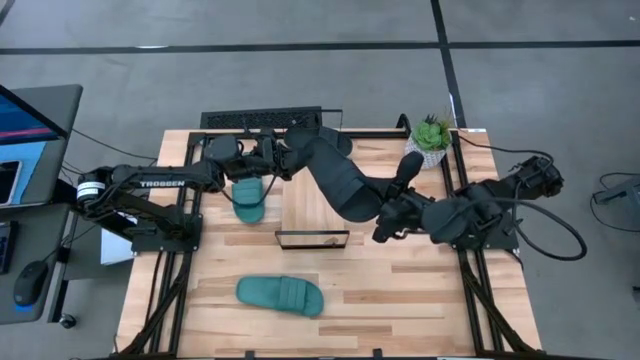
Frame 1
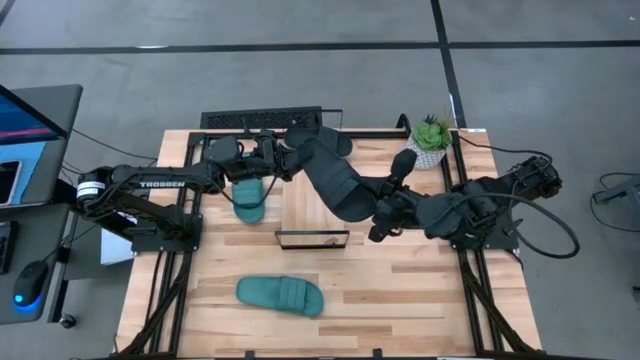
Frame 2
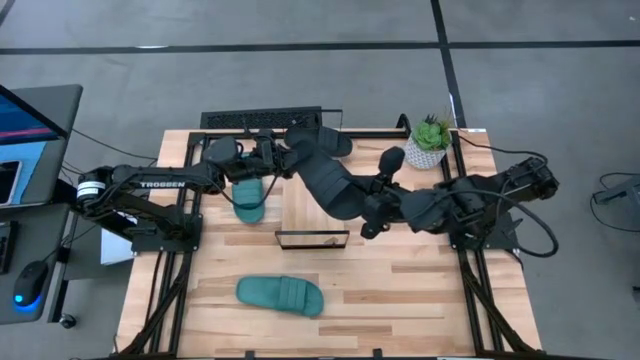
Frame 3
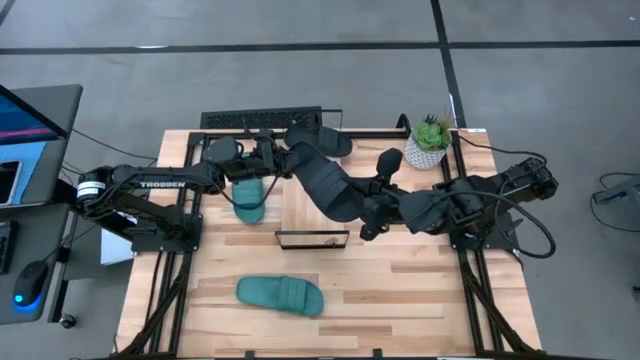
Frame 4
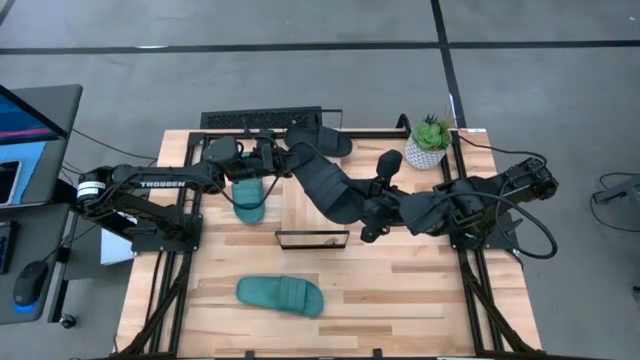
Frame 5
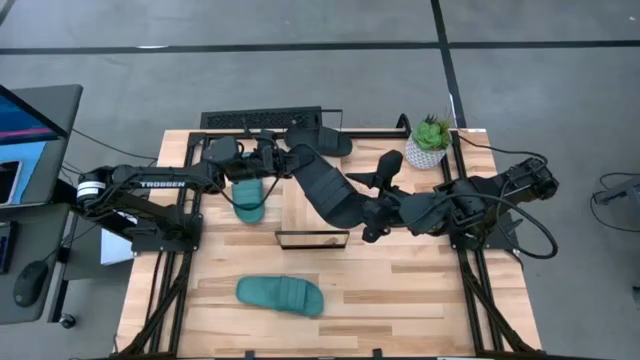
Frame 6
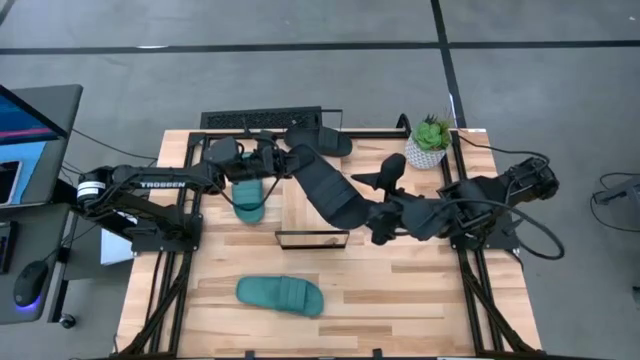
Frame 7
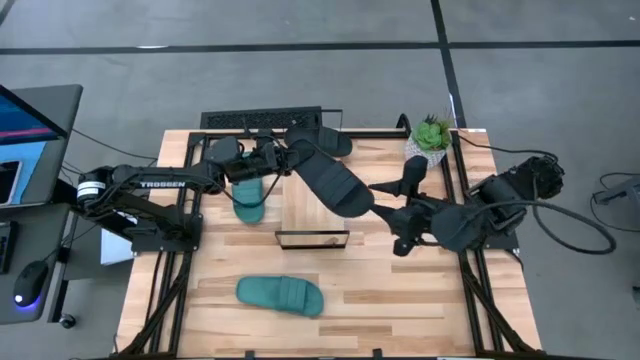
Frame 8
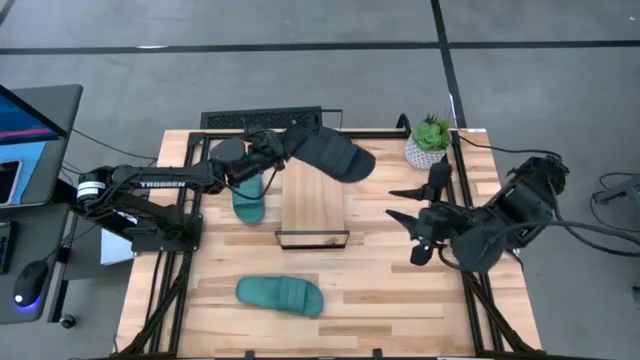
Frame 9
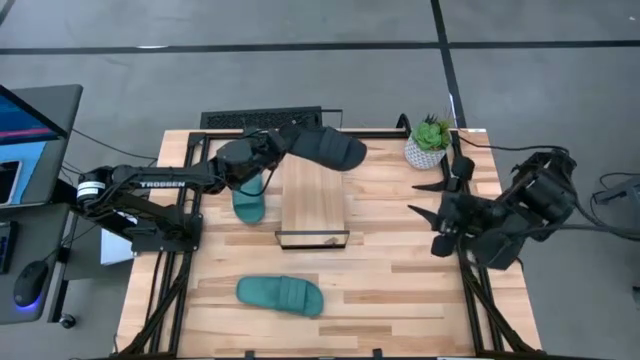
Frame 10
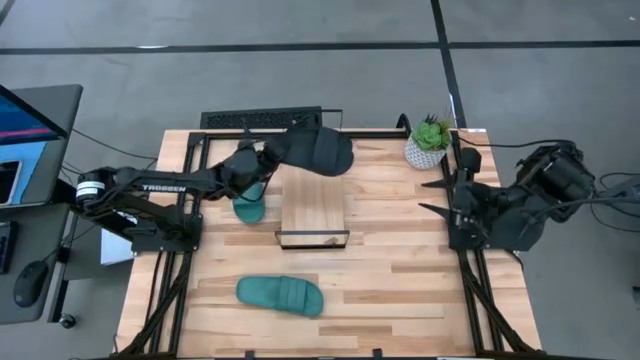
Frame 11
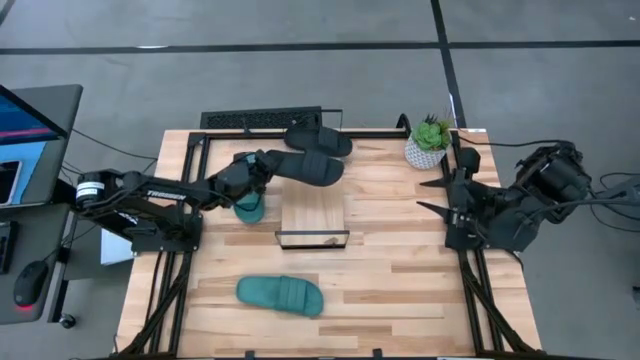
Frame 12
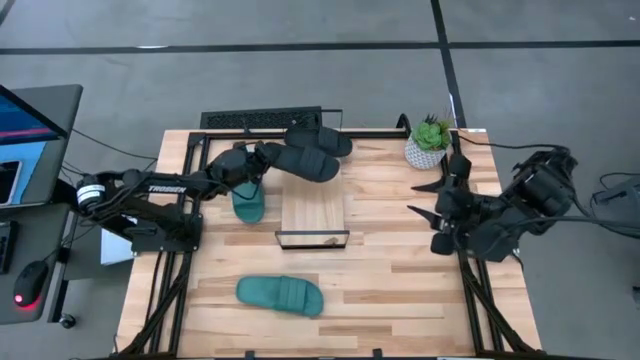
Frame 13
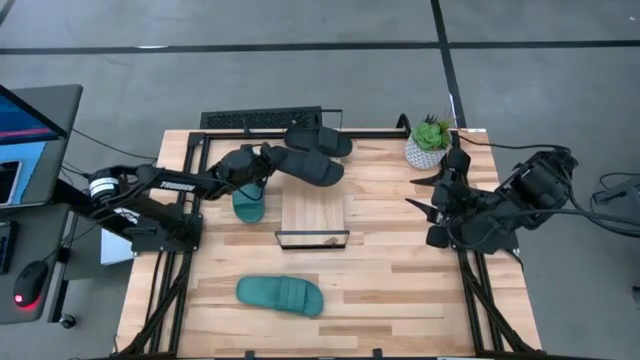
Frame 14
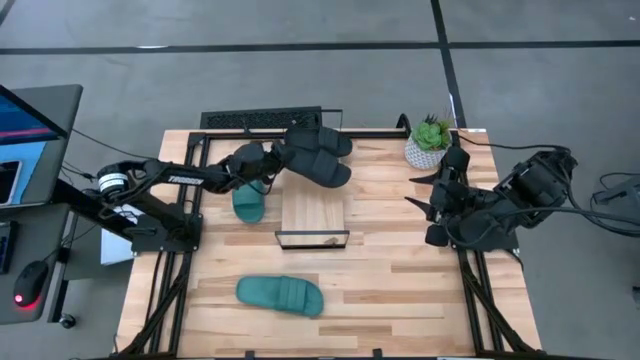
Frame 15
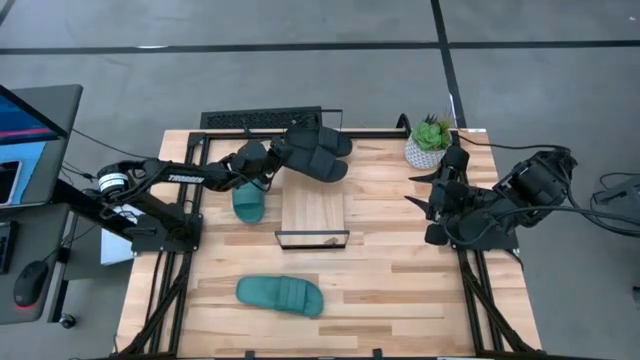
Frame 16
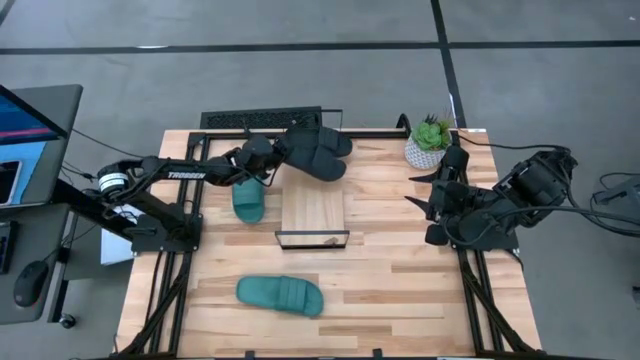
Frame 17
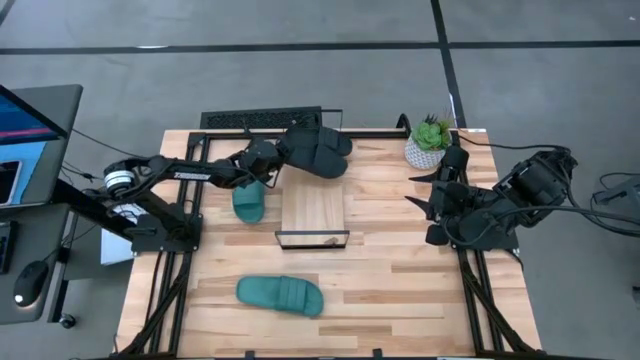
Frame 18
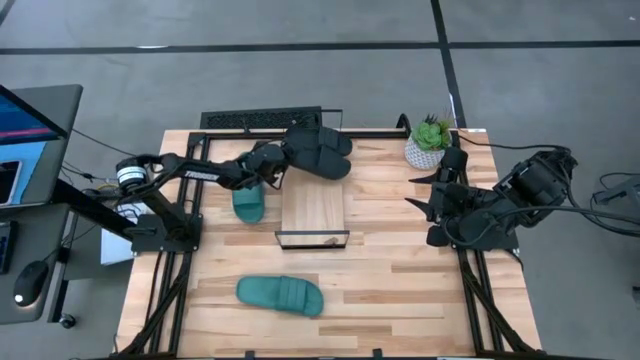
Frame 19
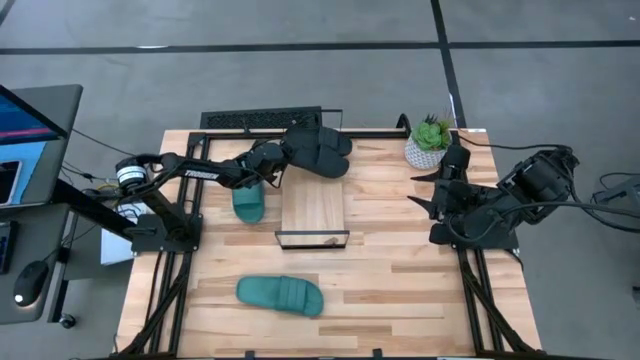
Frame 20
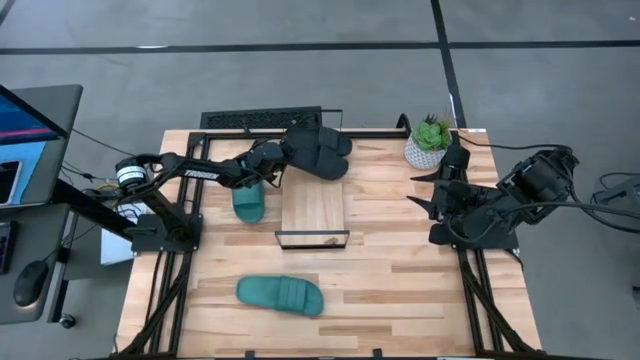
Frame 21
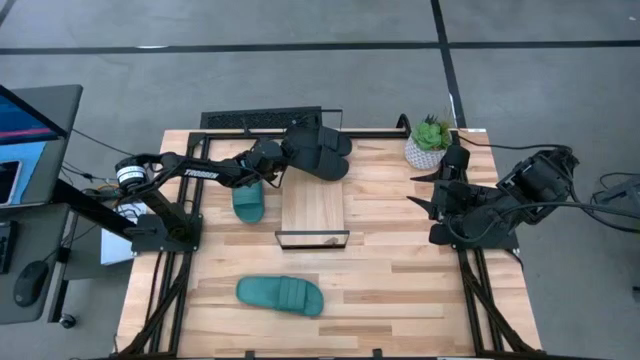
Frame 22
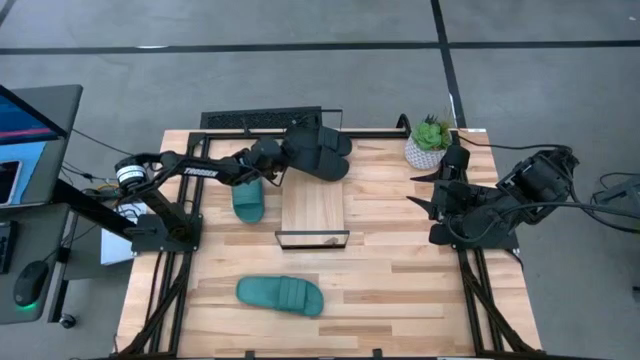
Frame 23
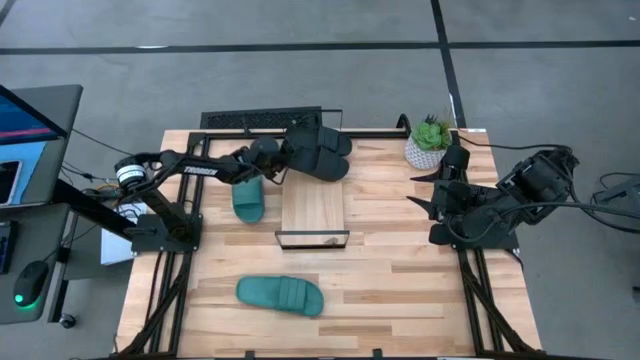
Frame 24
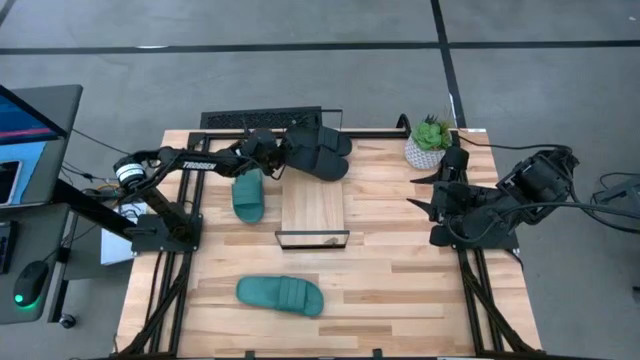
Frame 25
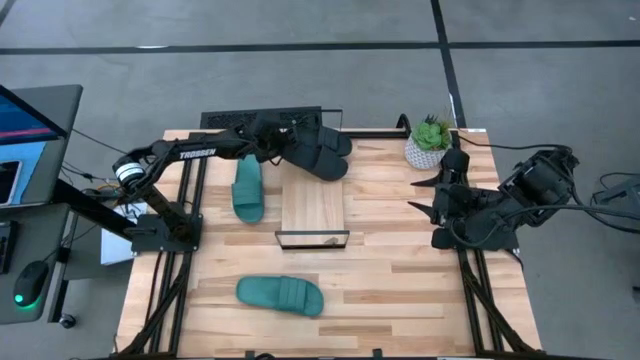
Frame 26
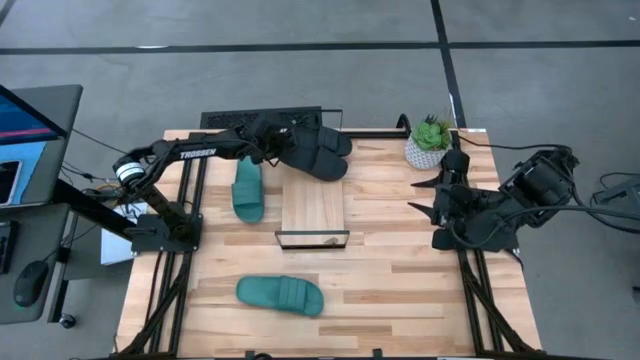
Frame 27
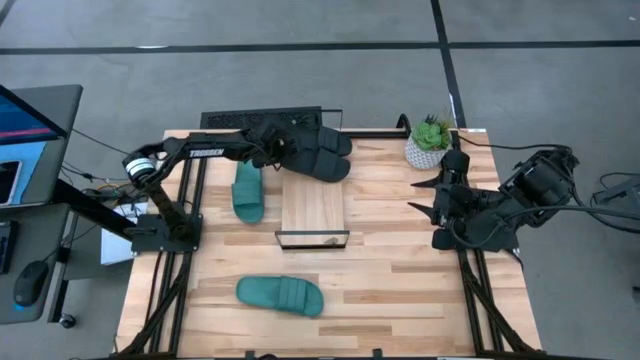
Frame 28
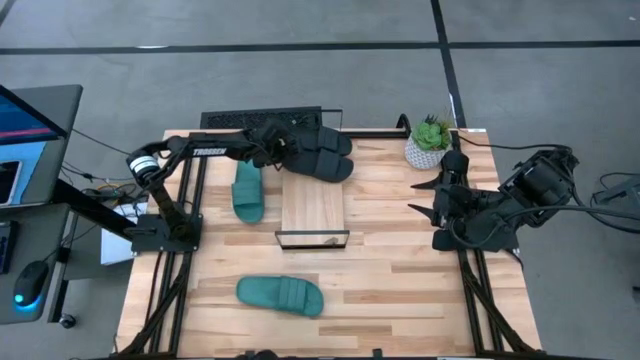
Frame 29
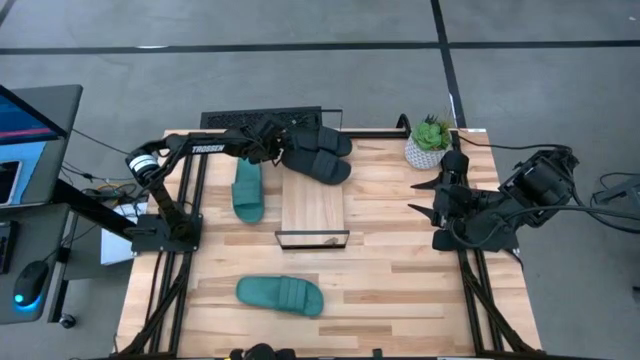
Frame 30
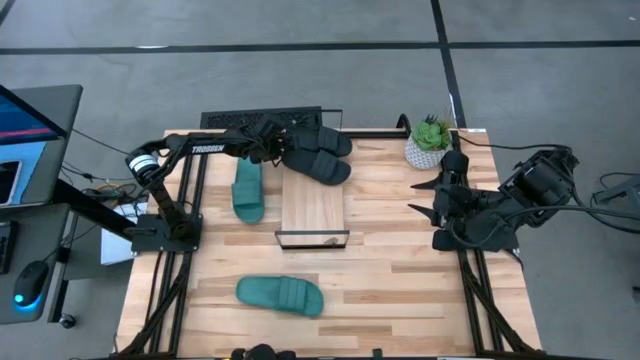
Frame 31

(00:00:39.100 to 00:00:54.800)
Task: Pick and place slides into the shelf
Put the black slides on the shelf

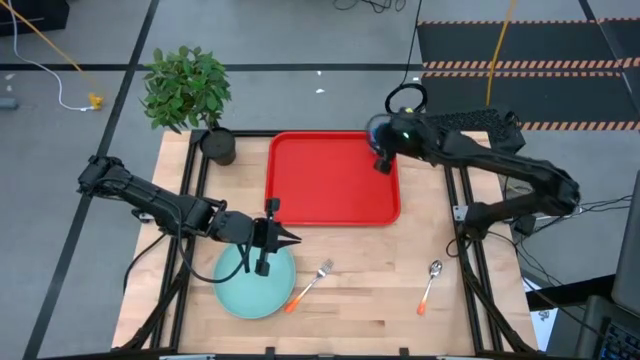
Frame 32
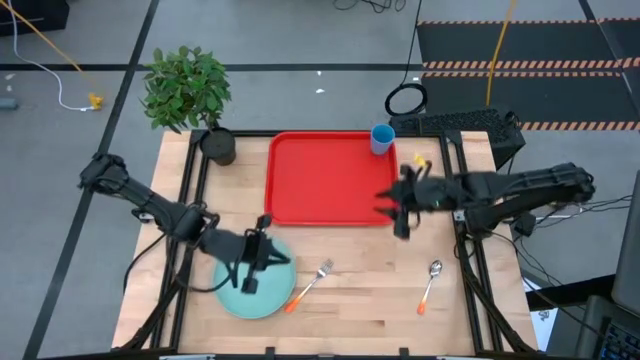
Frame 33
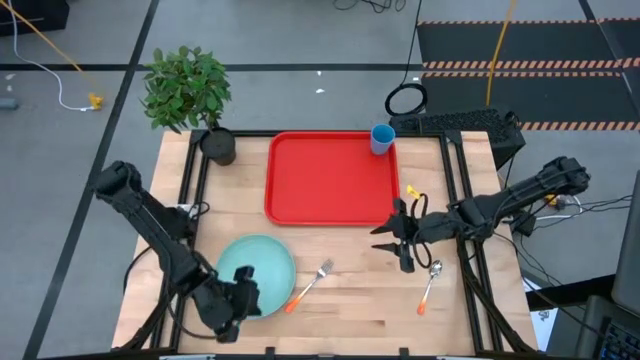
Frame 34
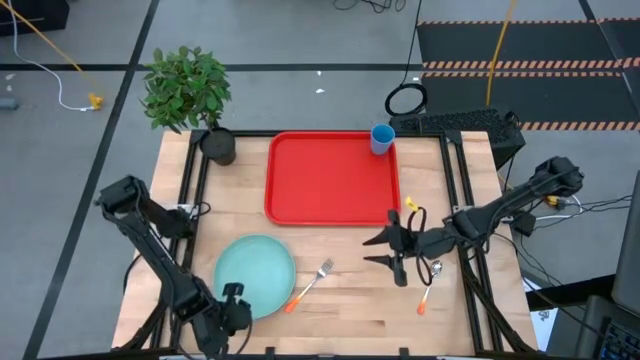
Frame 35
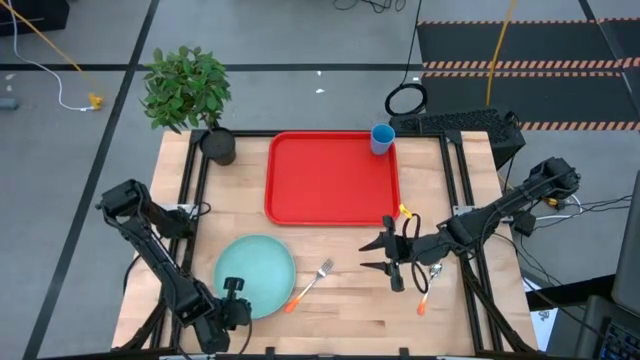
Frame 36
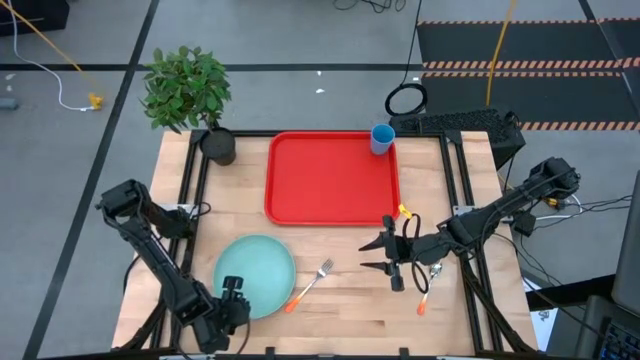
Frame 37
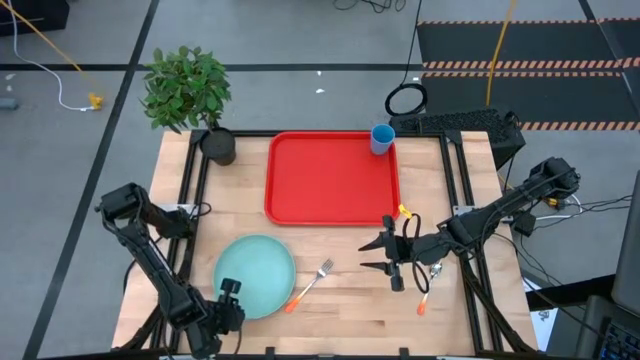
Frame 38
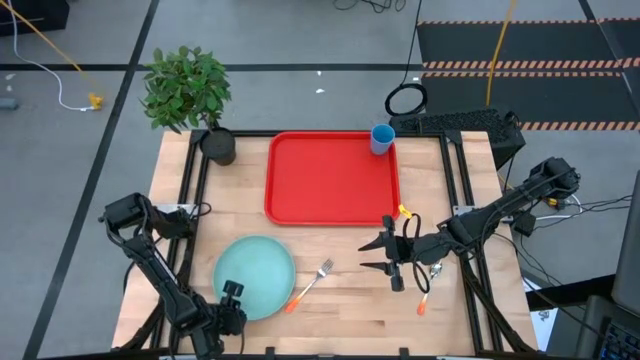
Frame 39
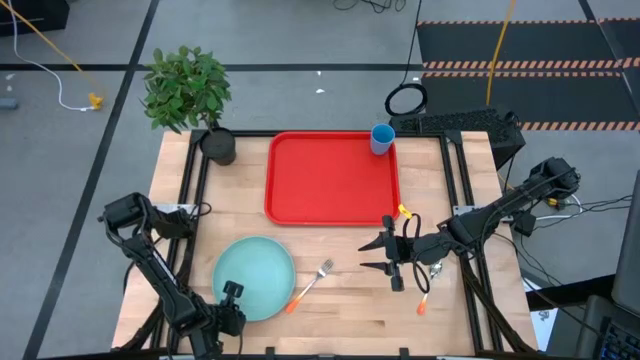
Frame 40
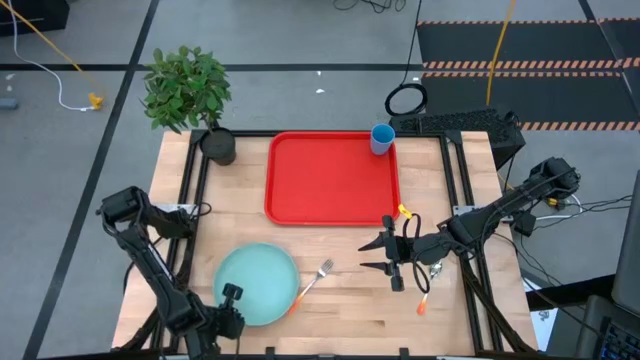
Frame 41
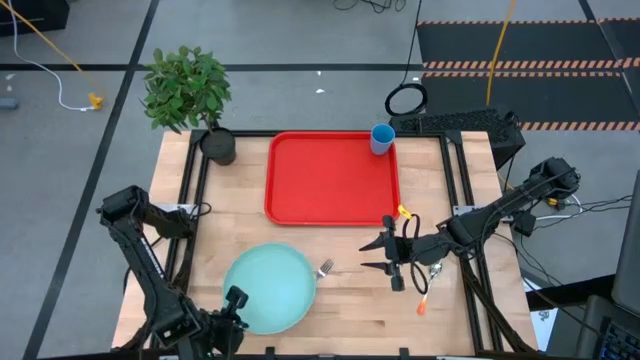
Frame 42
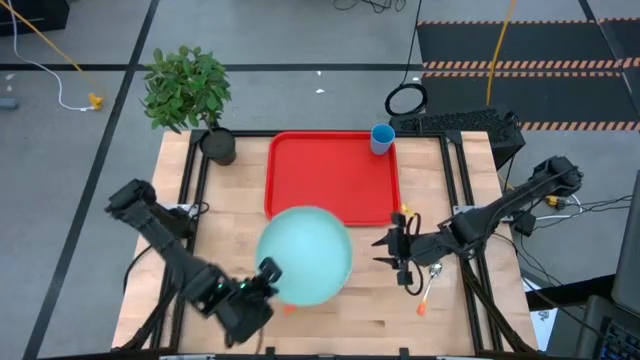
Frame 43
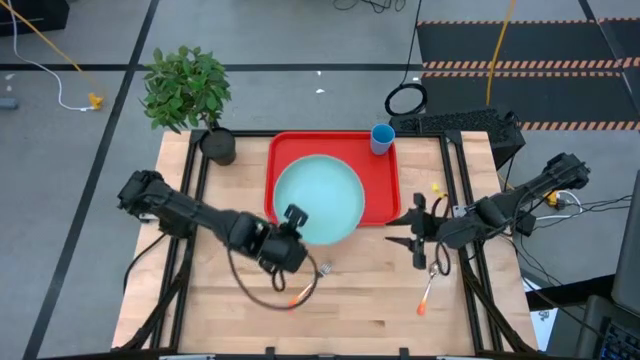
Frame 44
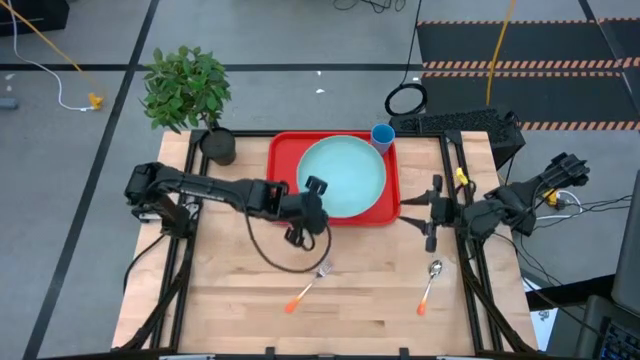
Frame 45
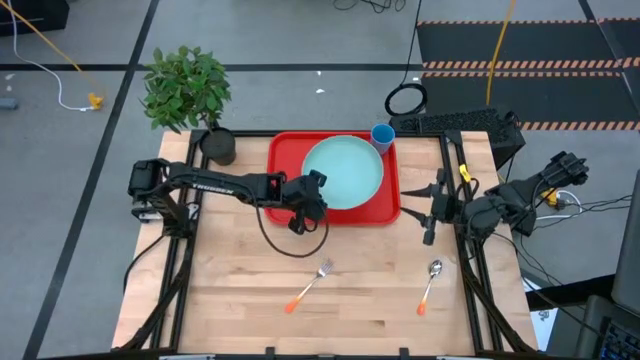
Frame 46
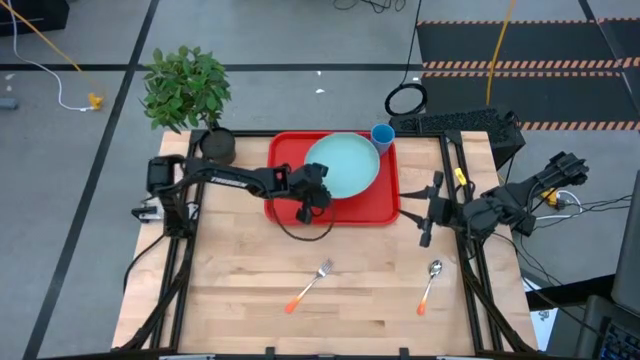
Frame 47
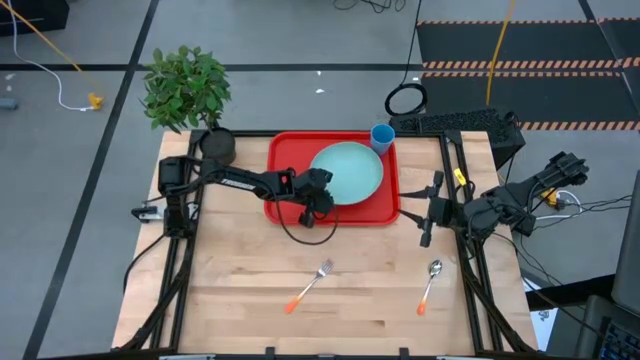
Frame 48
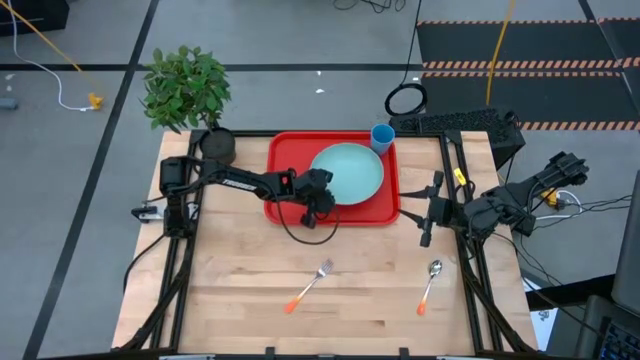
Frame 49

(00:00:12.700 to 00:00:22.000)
Task: Pick and place plate/cup/fork/spoon on tray
Put the blue plate on the orange serving tray to the bottom left of the blue cup
